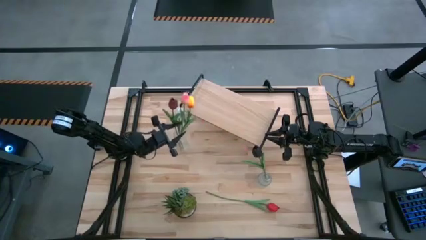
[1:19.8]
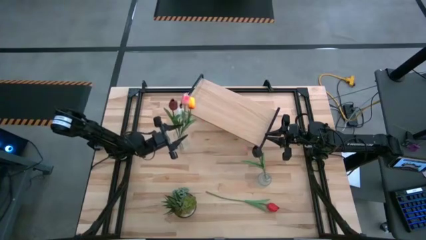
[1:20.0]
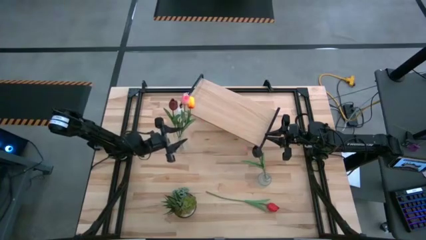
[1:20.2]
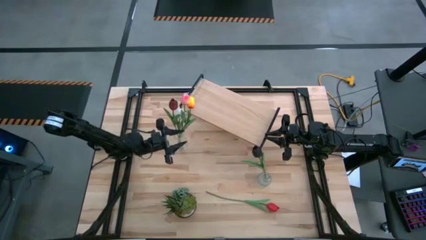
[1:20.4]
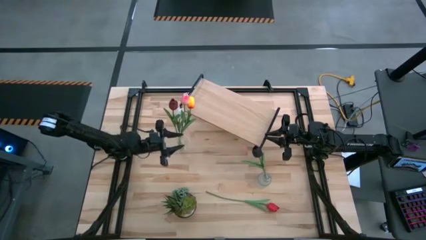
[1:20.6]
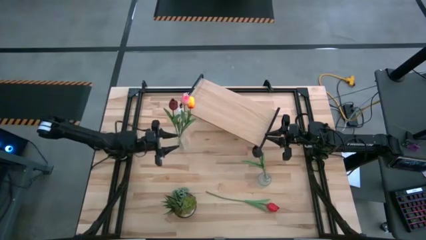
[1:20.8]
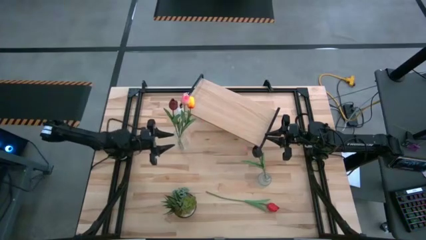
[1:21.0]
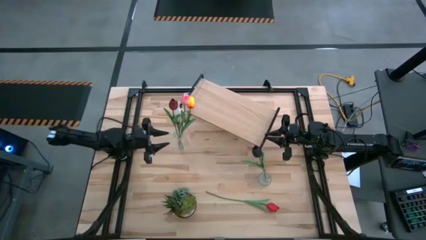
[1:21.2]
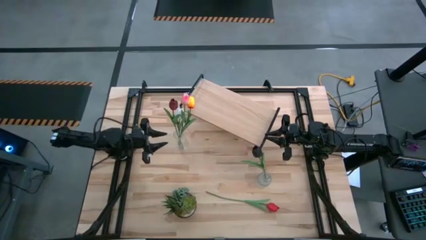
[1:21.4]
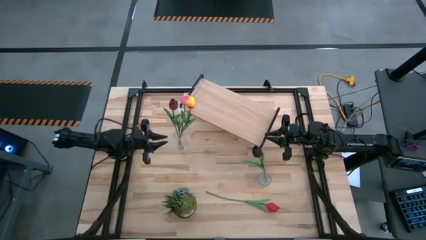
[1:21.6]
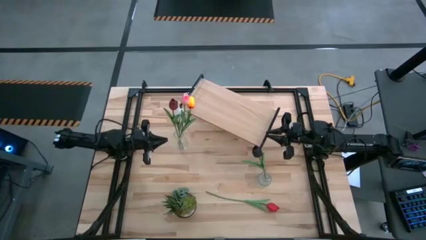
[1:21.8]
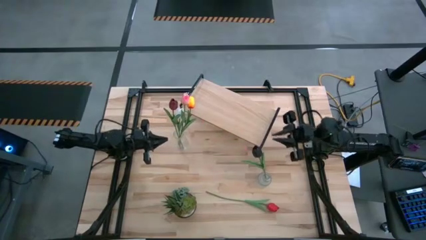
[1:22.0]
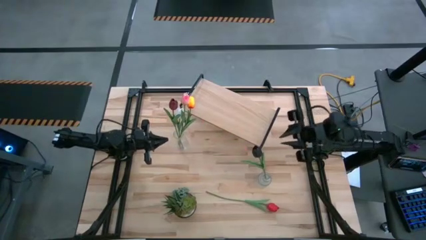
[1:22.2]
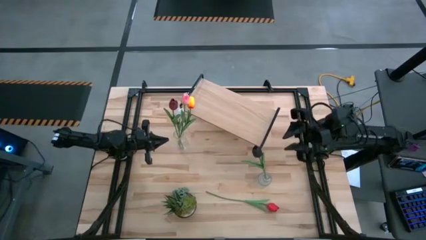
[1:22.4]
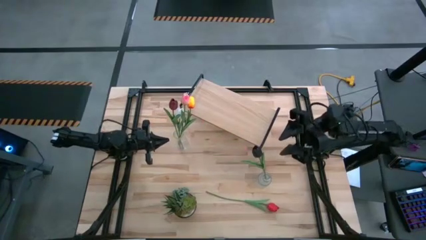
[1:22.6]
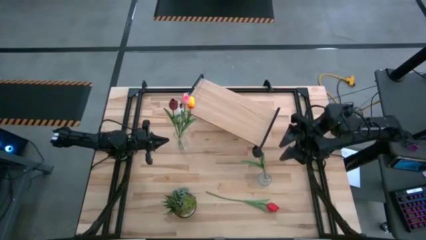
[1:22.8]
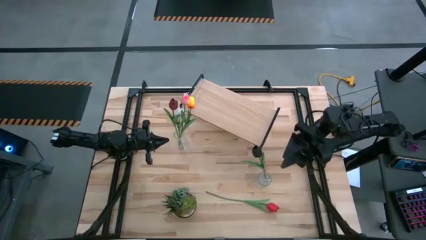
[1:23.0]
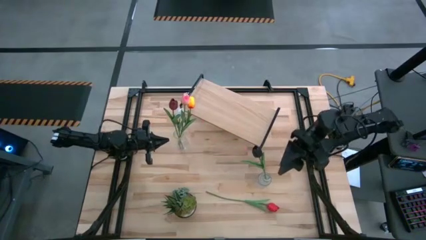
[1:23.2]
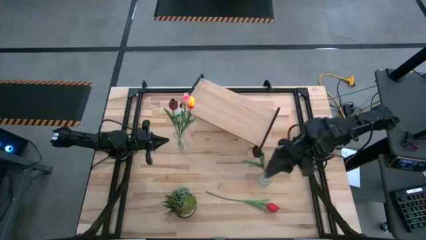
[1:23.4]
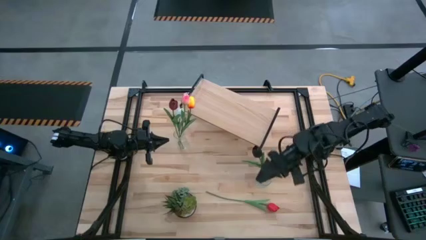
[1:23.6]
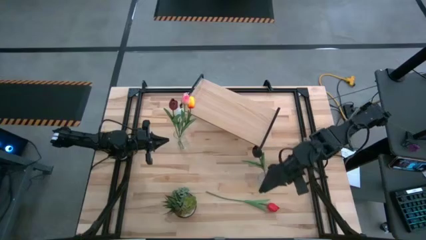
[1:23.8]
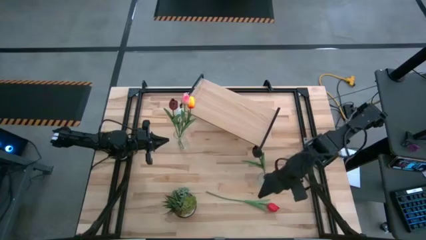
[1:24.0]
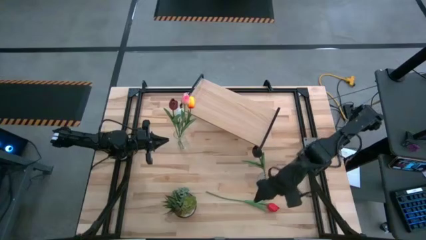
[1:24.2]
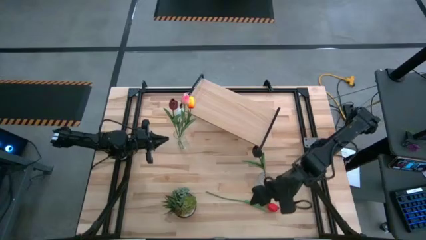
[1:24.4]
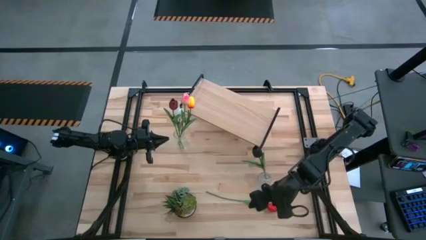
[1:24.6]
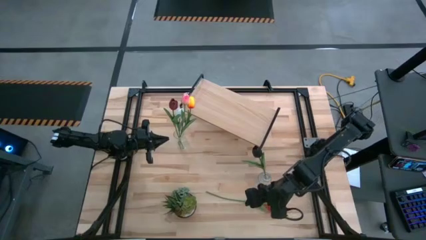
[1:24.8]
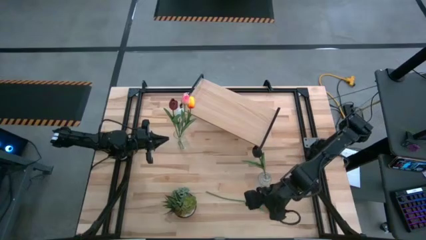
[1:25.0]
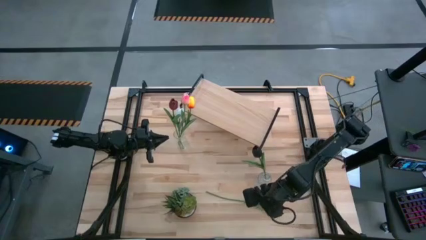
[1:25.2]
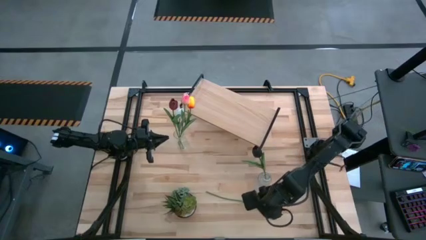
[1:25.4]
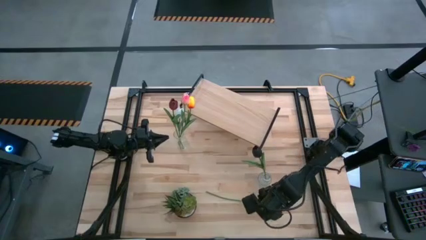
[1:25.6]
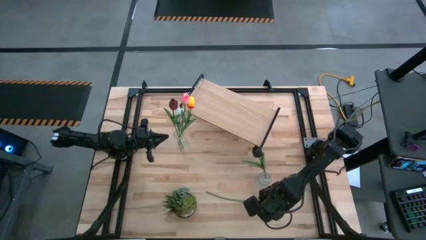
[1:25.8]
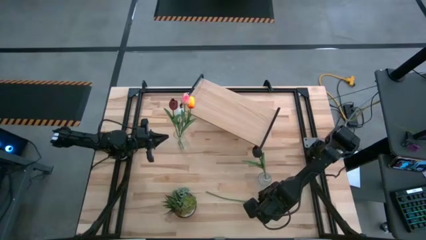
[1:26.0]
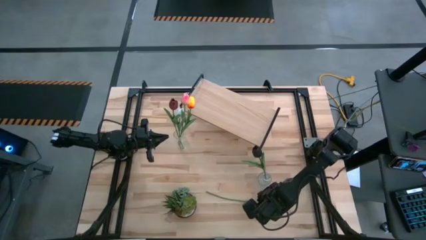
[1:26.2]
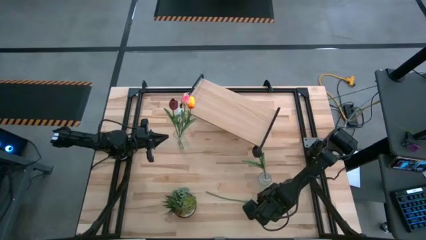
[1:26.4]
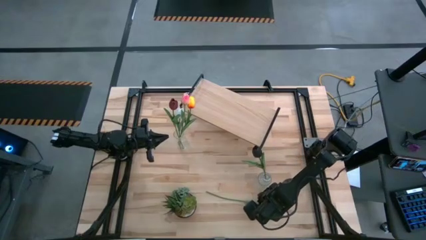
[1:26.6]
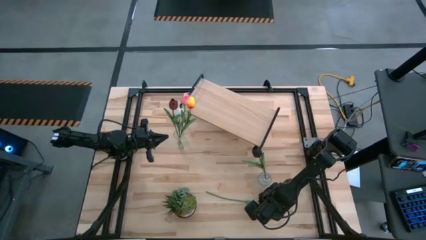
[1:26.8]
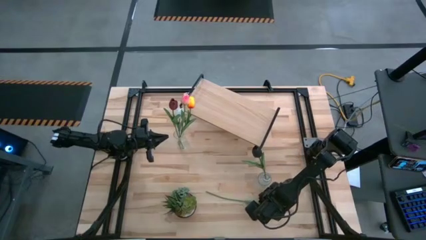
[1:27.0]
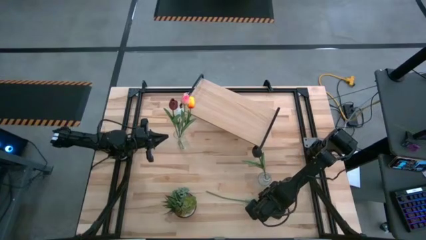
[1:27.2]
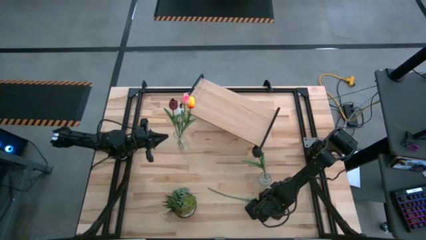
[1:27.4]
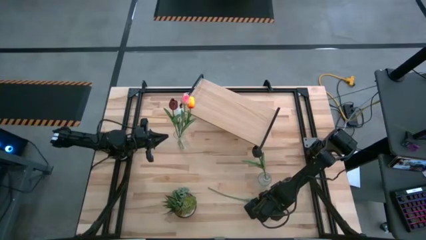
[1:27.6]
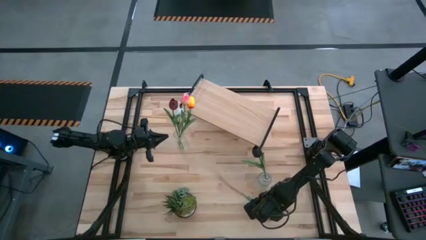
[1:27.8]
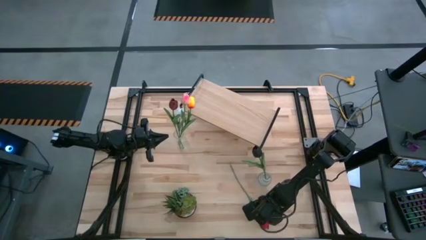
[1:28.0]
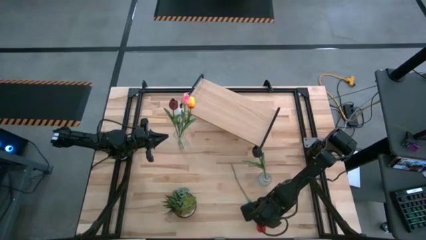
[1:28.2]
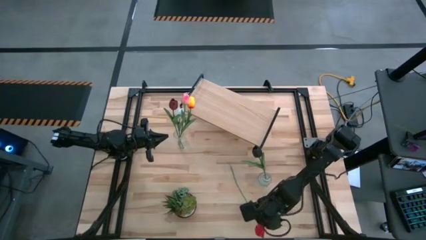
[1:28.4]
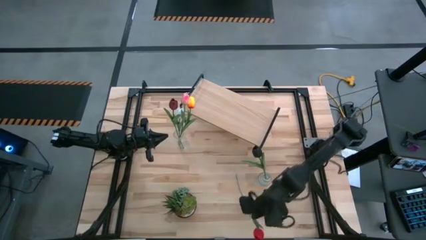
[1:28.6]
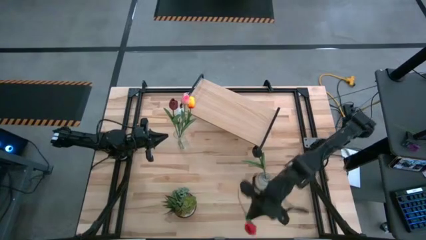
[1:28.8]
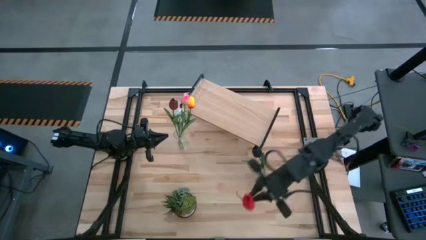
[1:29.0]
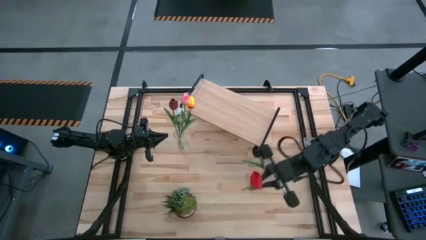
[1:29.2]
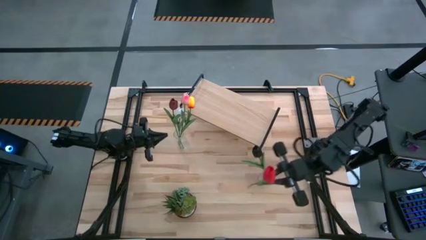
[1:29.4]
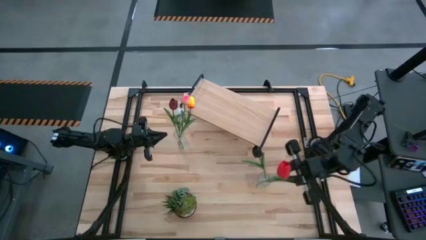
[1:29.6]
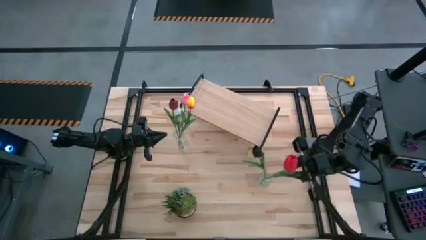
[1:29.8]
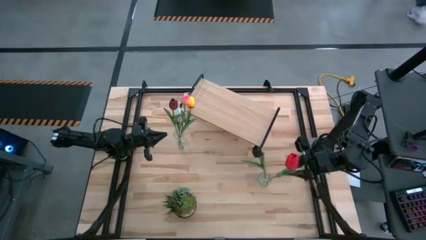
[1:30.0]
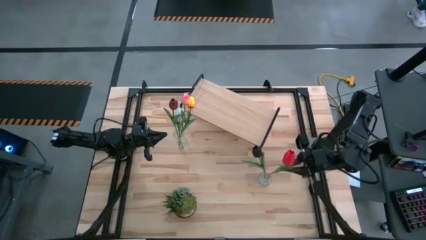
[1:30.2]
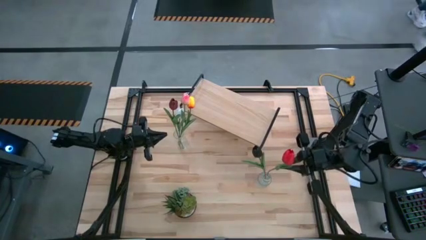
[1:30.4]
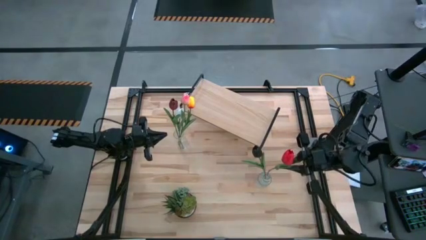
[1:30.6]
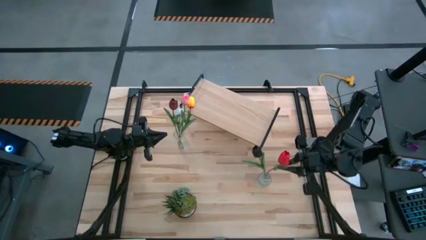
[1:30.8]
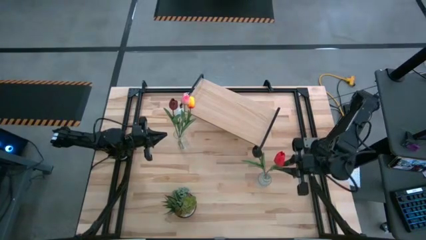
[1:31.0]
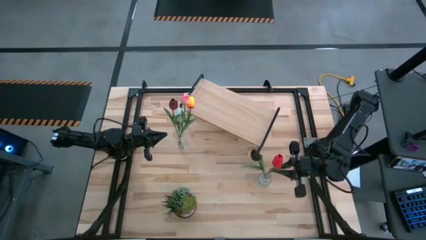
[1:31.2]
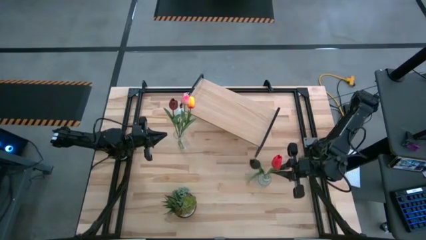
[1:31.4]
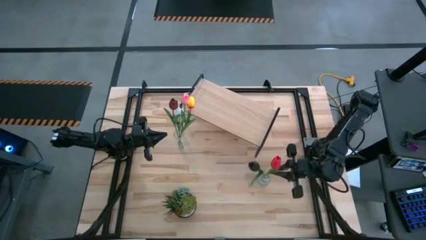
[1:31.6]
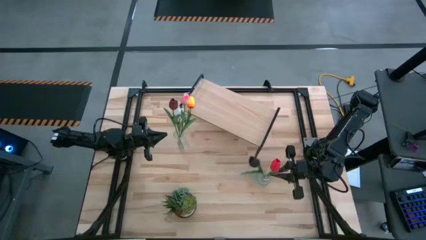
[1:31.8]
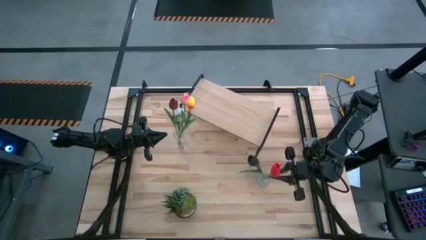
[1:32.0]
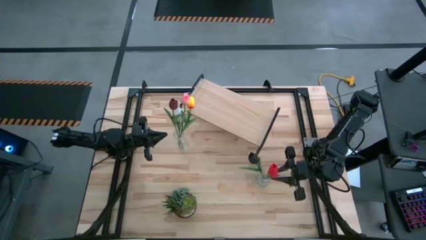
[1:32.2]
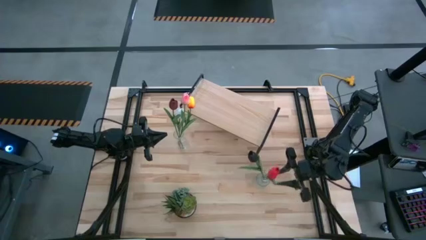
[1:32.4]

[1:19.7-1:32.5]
Task: Pick and place flowers into a vace then onto a shelf
Put the red tulip into the right transparent vase

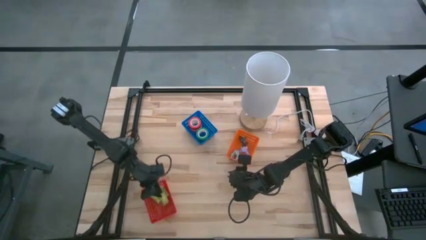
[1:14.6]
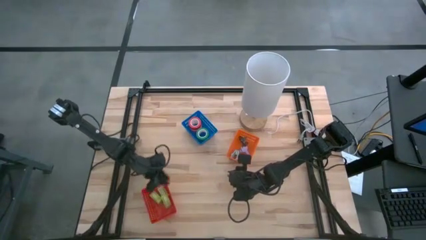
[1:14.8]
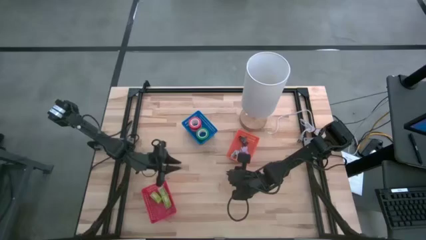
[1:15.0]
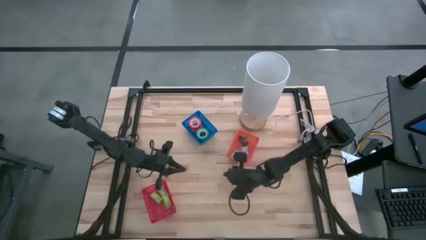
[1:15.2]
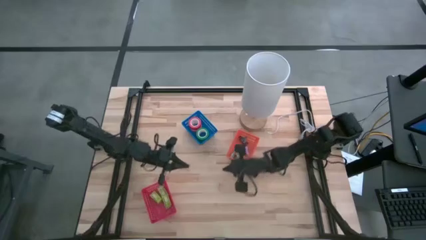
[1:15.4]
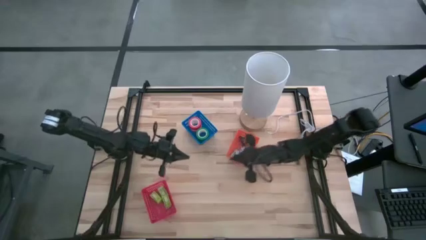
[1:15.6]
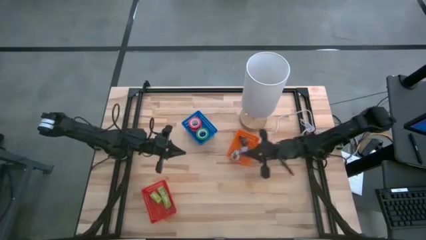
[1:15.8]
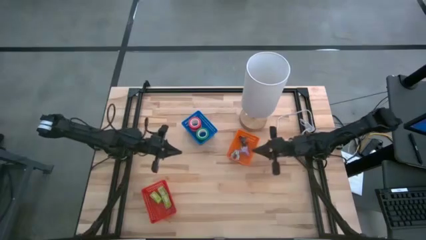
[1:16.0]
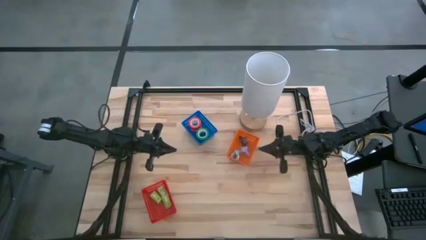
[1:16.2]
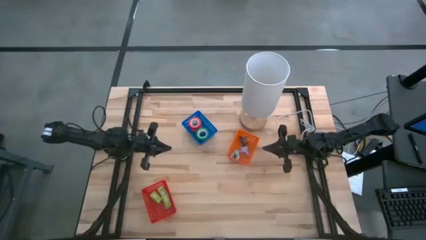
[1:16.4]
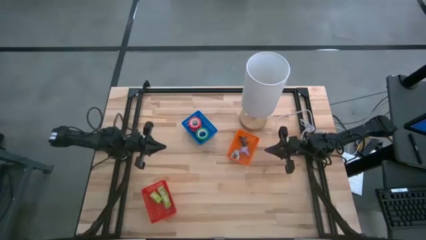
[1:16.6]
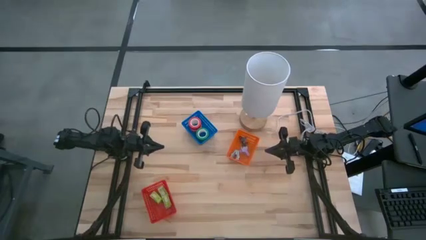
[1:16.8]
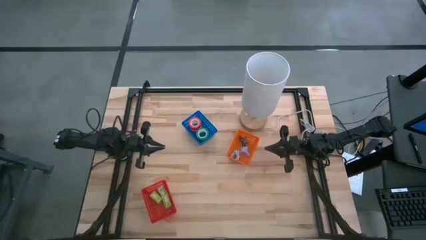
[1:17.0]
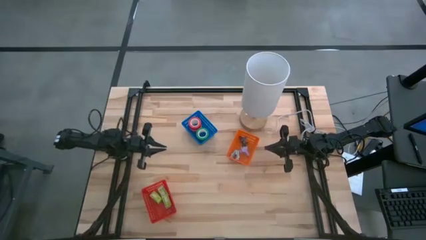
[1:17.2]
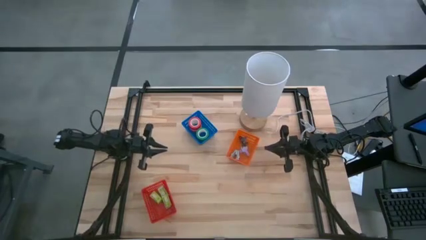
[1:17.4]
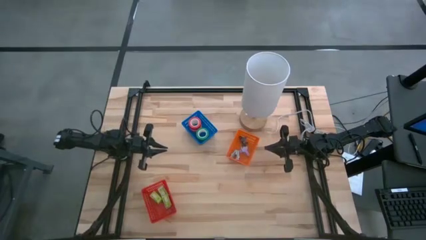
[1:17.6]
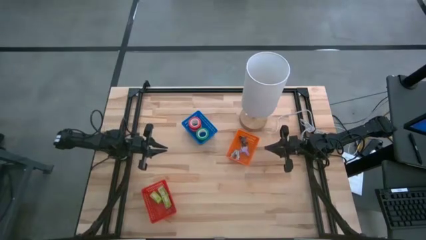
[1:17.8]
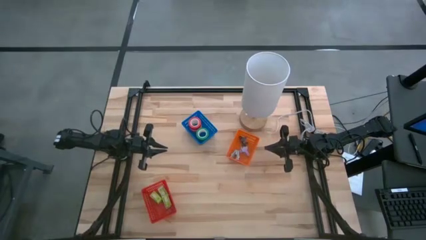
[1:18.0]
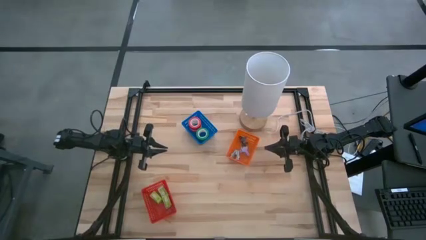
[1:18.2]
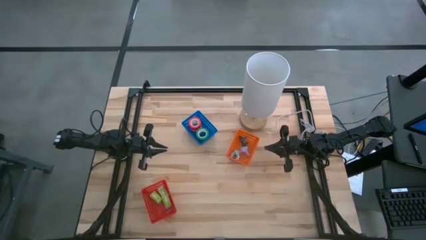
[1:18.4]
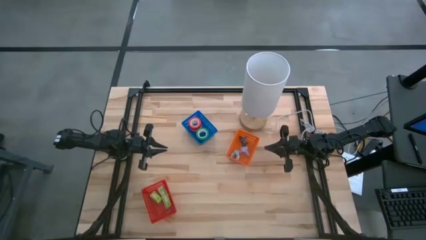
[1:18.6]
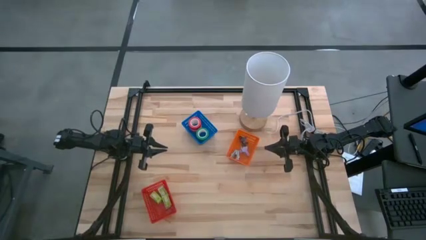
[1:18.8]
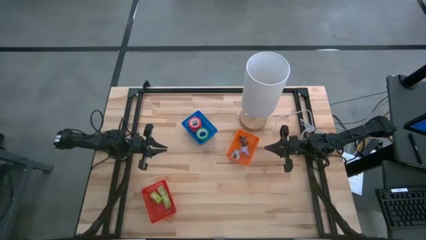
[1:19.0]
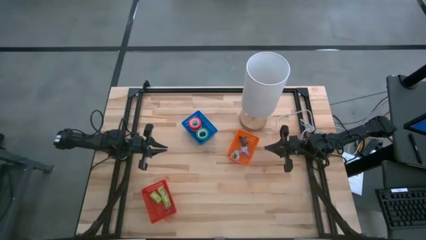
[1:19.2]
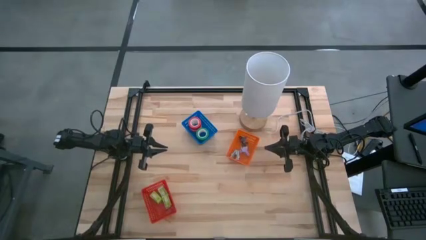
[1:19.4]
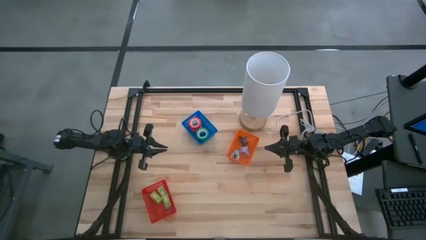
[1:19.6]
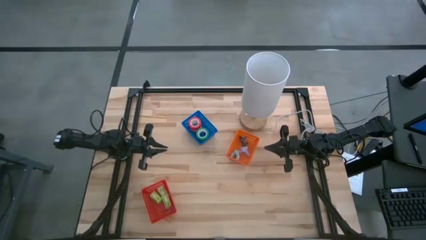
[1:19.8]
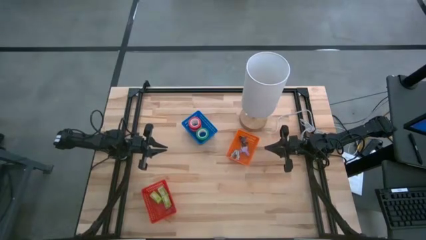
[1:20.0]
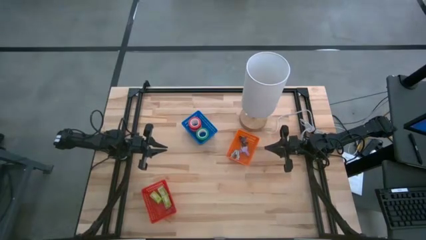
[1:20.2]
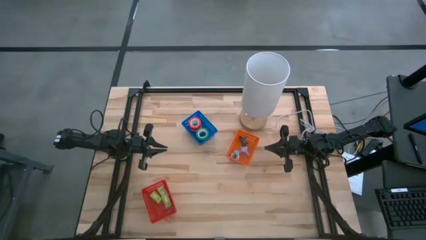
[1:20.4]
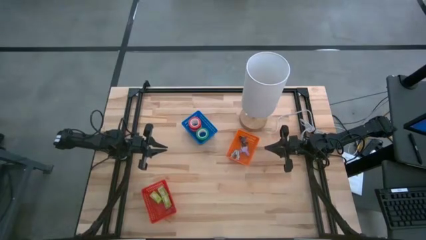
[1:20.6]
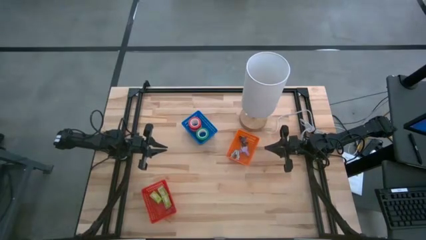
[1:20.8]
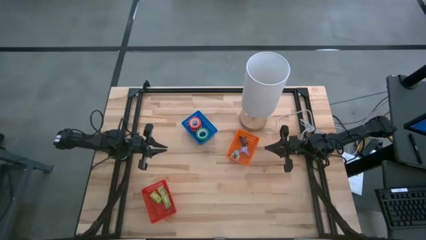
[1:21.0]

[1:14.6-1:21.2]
Task: Pick and place Stapler, Stapler remover, tape
Return to Home Position
